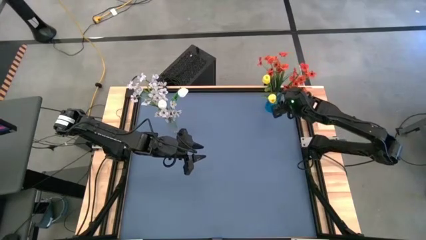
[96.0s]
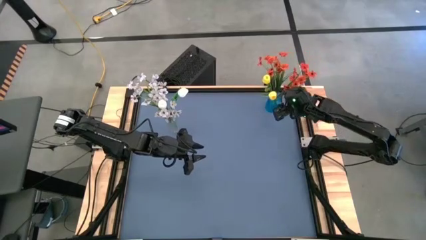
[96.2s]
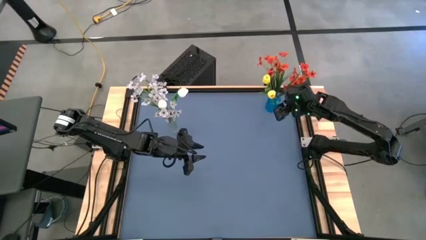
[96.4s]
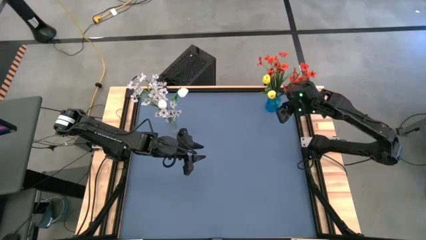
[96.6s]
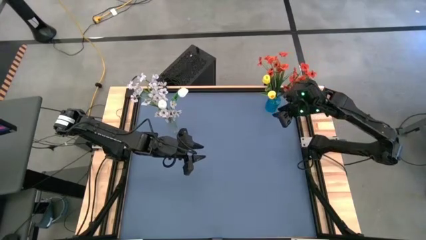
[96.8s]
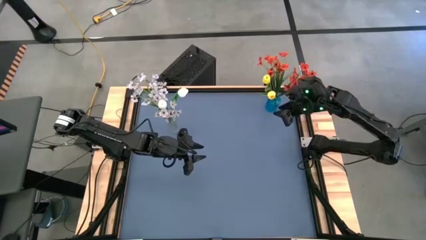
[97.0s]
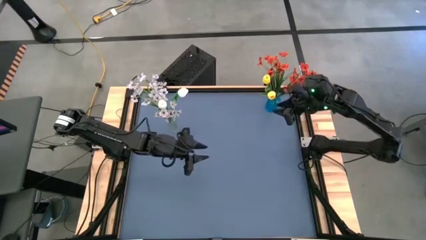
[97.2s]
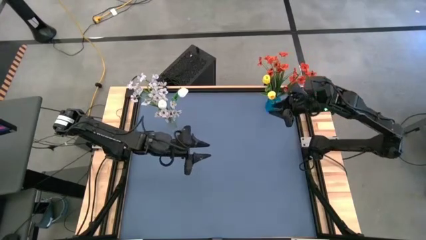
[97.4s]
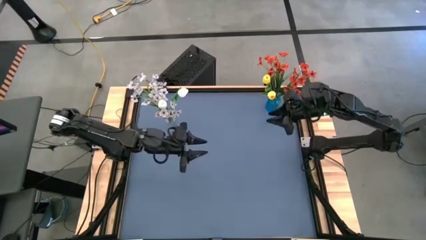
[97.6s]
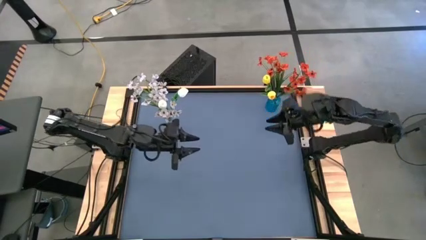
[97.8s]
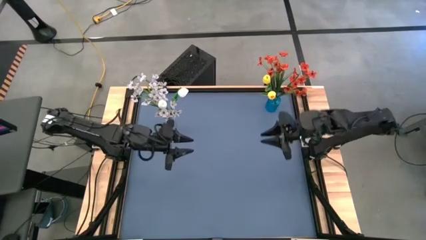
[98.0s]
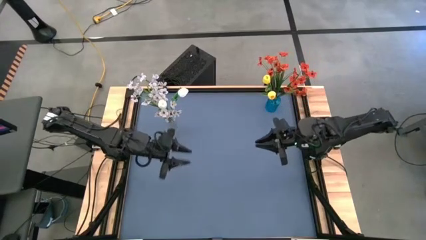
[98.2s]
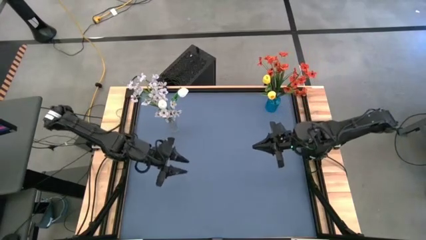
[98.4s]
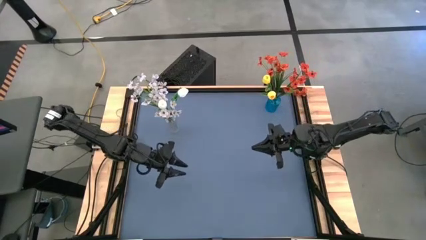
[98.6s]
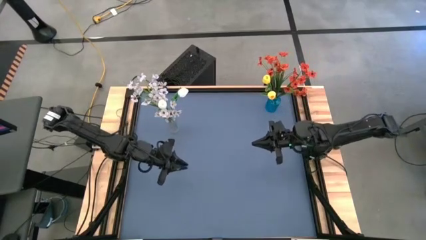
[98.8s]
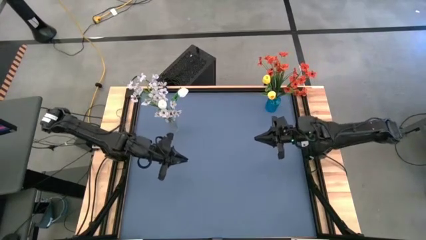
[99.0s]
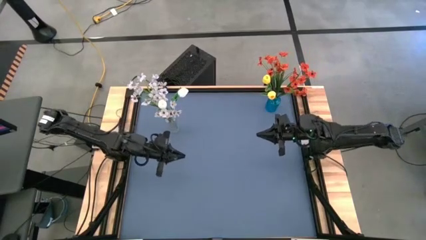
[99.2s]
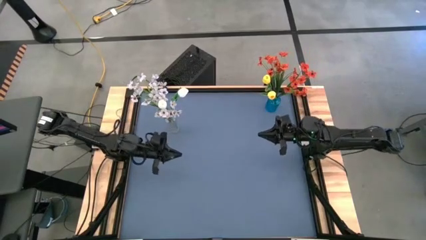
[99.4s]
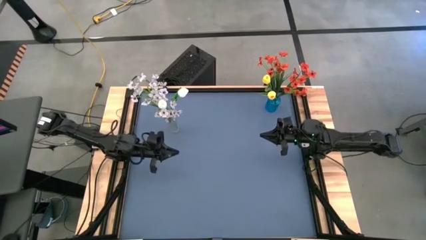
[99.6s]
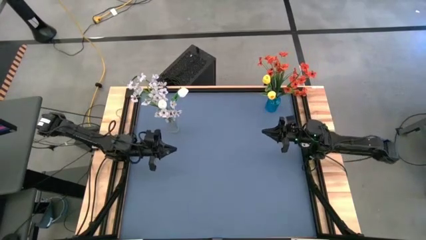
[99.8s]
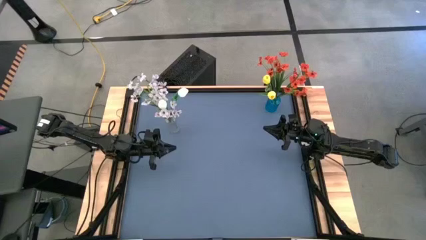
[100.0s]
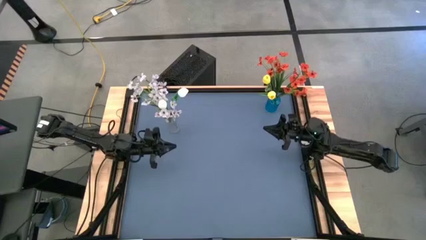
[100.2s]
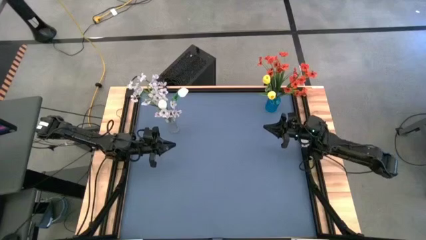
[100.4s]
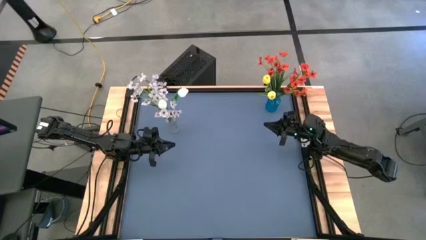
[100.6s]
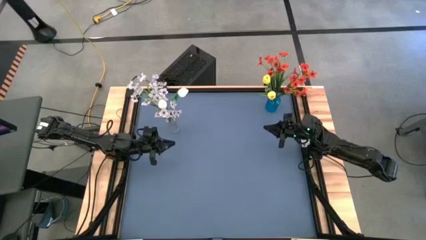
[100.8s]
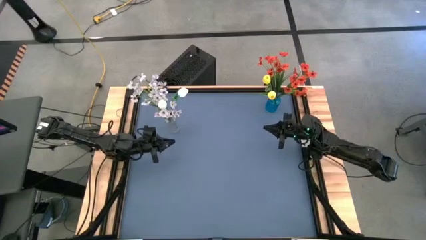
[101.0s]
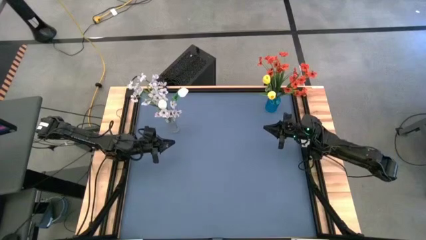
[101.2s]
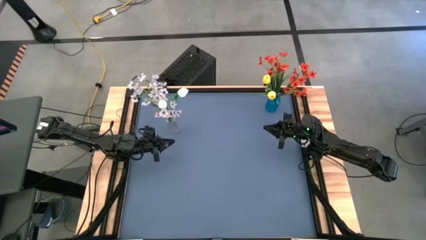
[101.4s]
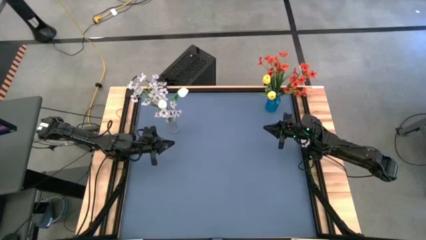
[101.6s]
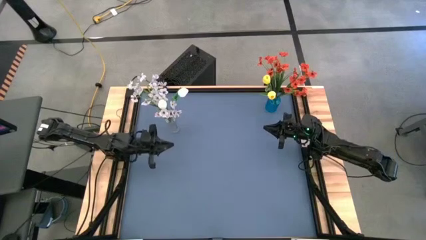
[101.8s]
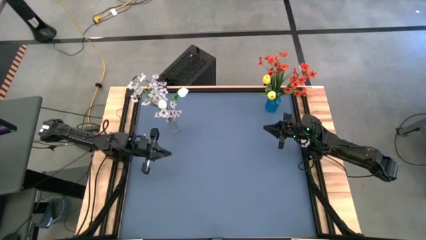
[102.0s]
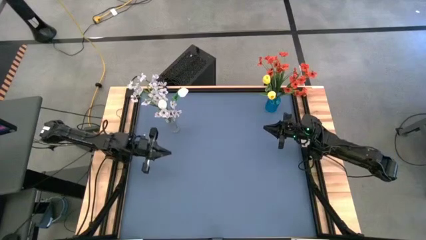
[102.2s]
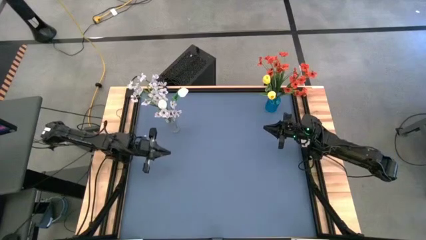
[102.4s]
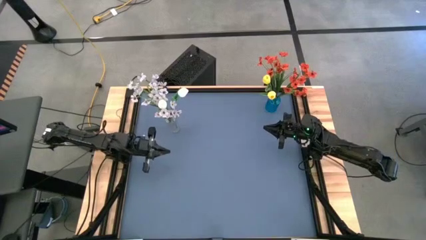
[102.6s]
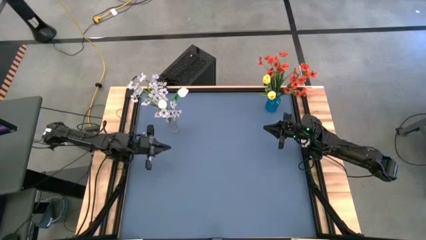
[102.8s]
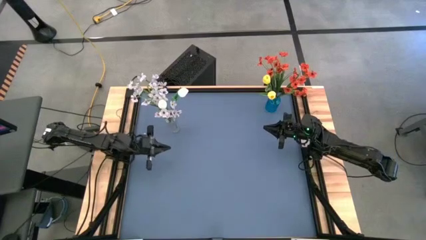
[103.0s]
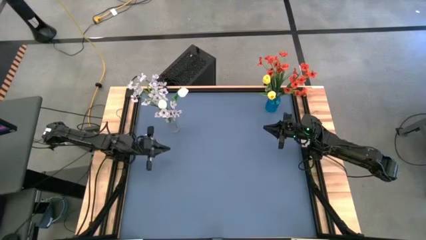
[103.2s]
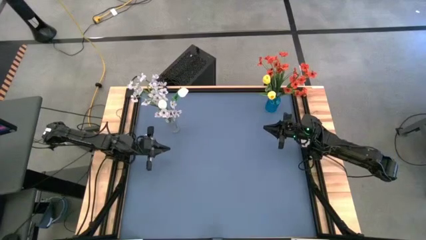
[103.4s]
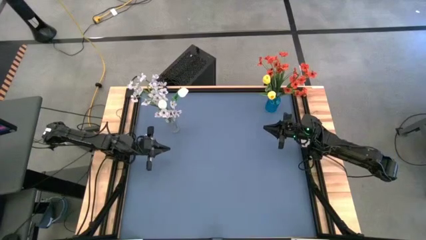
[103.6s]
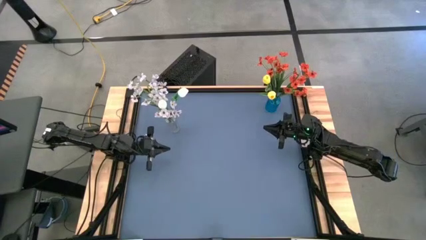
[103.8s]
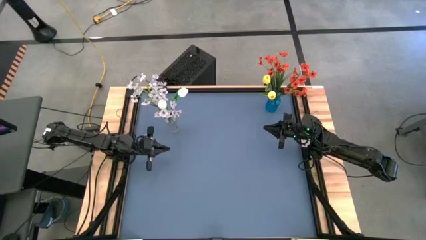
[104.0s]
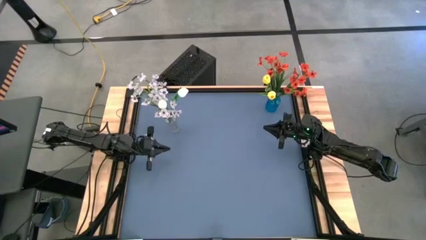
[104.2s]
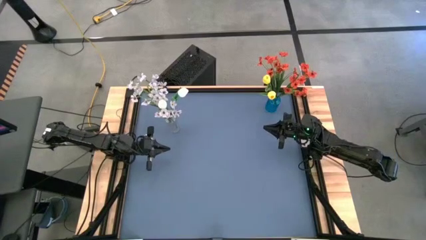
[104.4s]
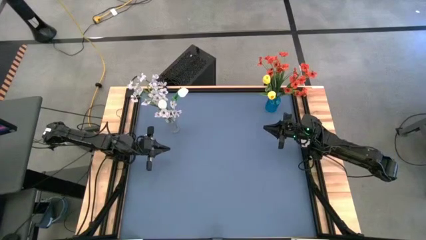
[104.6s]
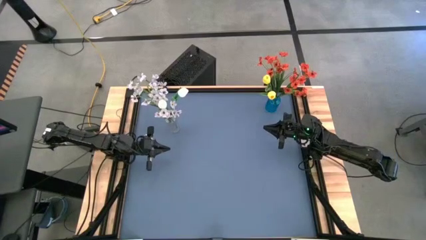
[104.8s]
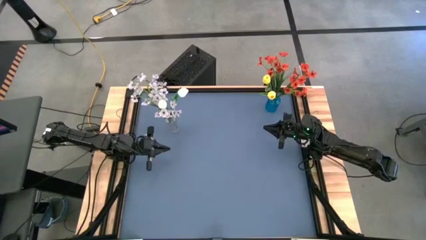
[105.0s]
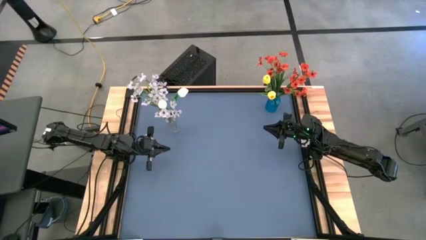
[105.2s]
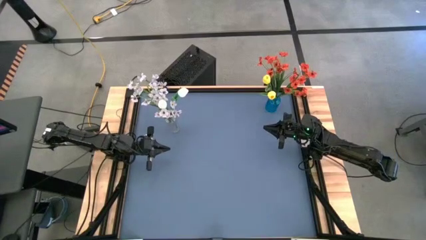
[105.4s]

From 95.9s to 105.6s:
Task: Sort flowers into vase by color
Return to Home Position

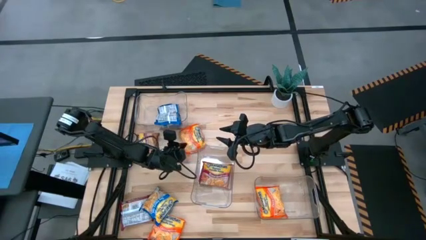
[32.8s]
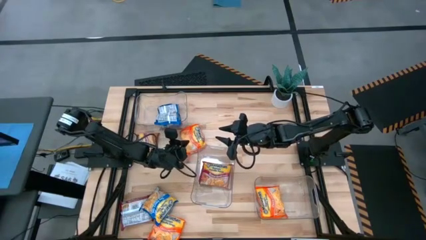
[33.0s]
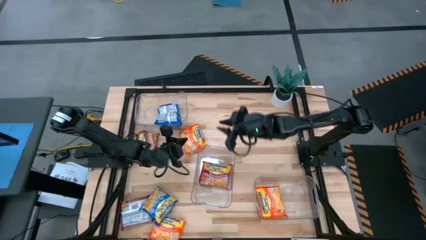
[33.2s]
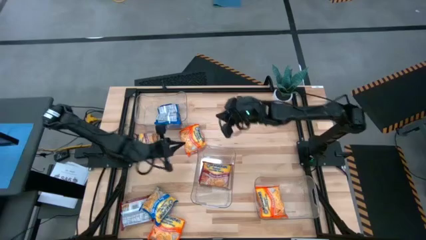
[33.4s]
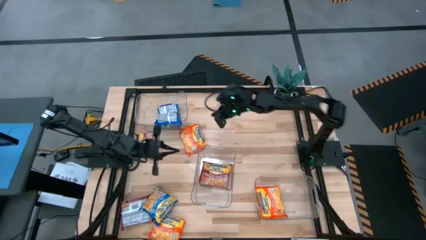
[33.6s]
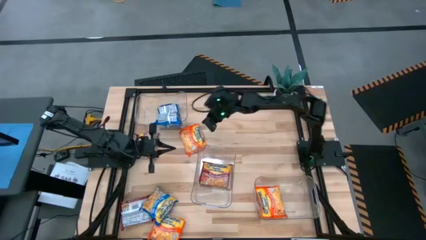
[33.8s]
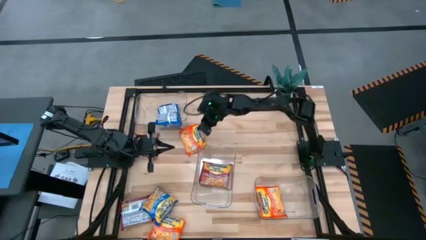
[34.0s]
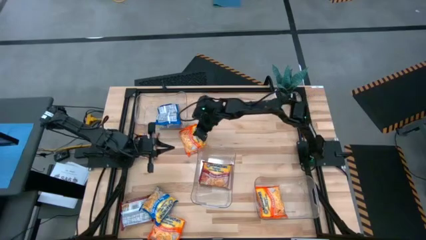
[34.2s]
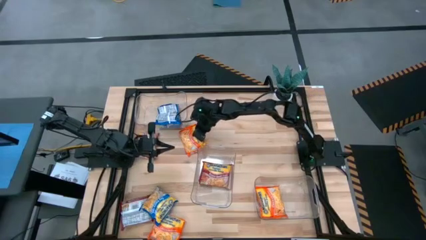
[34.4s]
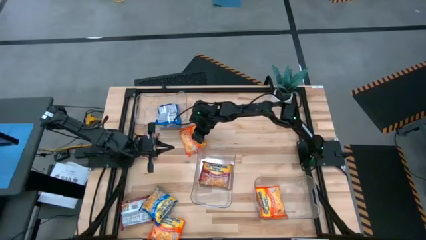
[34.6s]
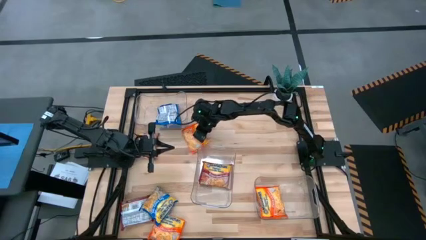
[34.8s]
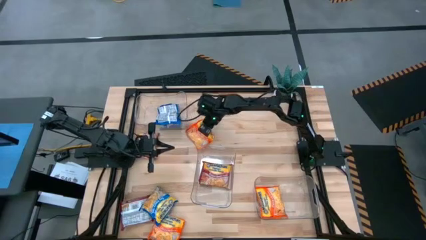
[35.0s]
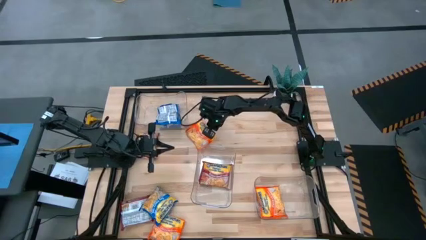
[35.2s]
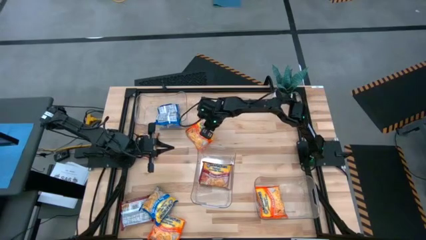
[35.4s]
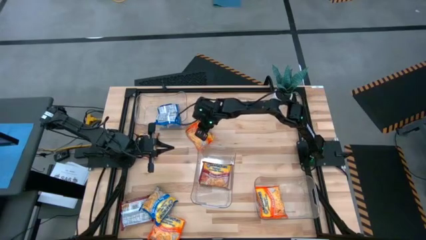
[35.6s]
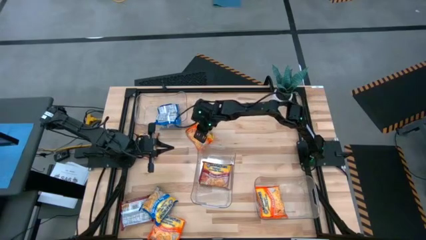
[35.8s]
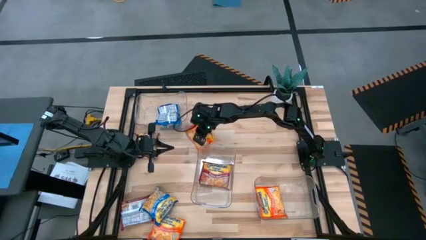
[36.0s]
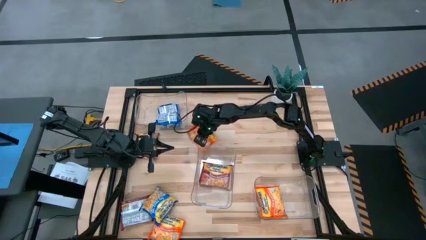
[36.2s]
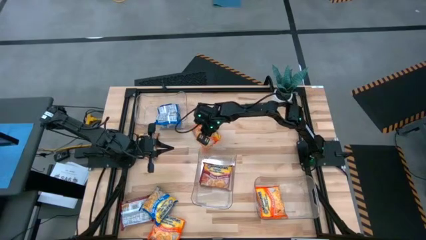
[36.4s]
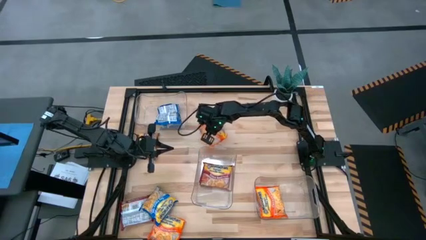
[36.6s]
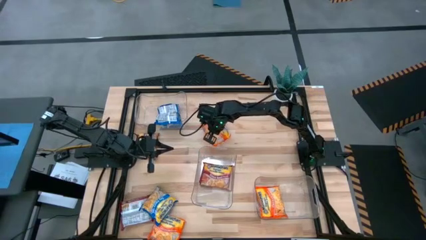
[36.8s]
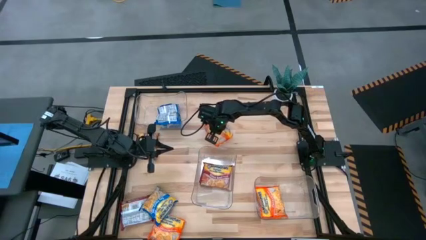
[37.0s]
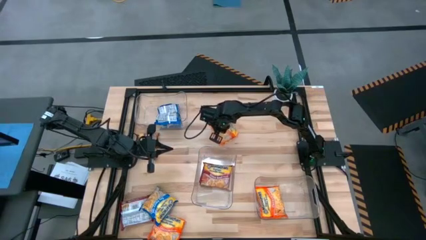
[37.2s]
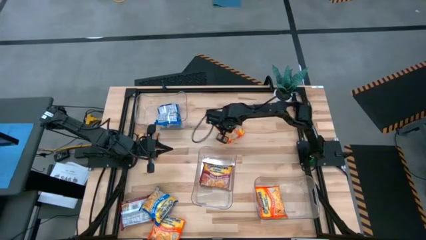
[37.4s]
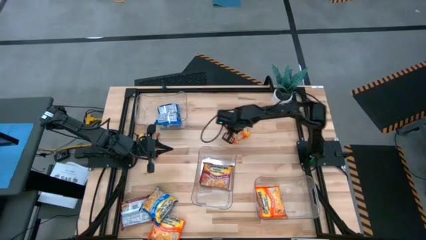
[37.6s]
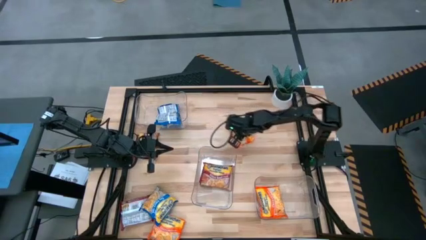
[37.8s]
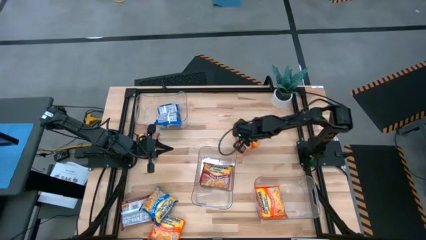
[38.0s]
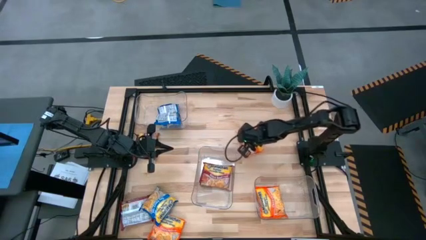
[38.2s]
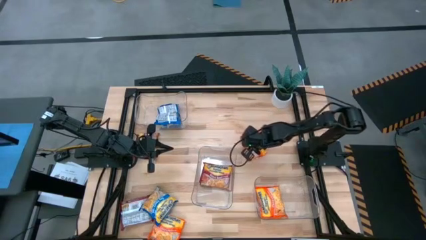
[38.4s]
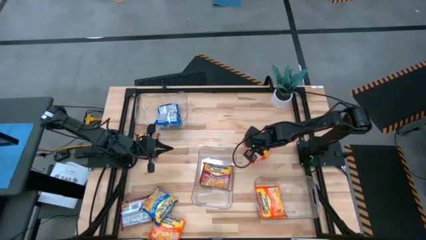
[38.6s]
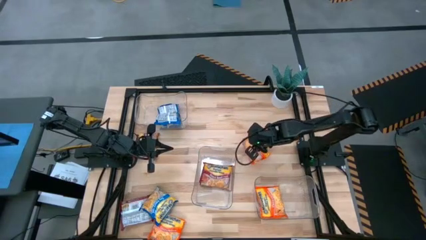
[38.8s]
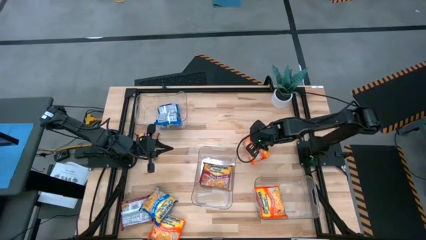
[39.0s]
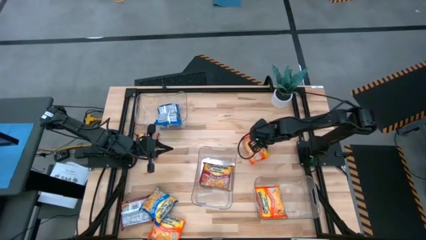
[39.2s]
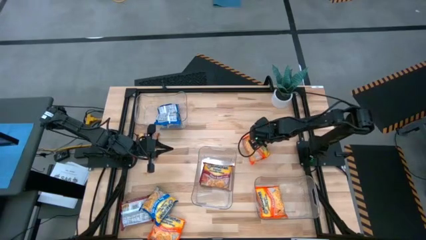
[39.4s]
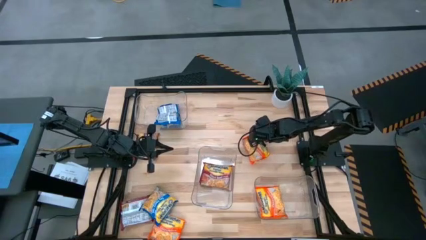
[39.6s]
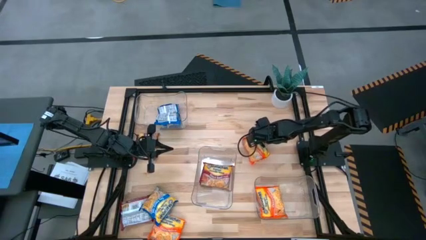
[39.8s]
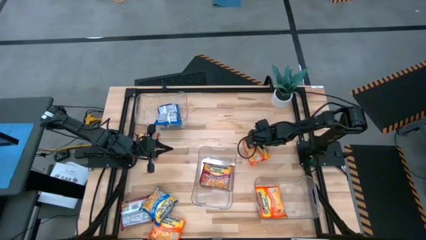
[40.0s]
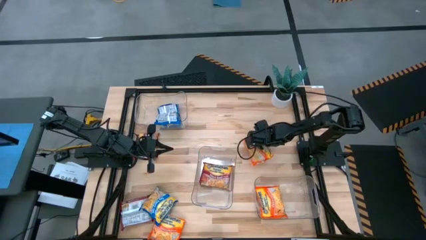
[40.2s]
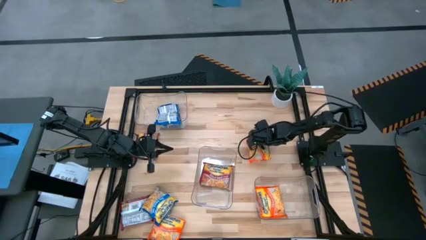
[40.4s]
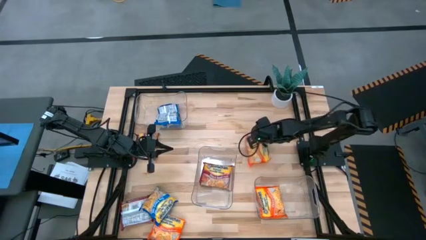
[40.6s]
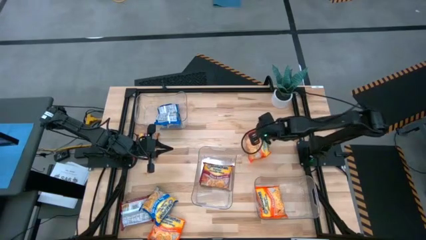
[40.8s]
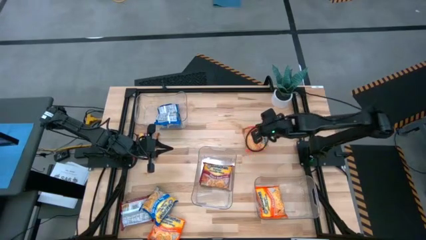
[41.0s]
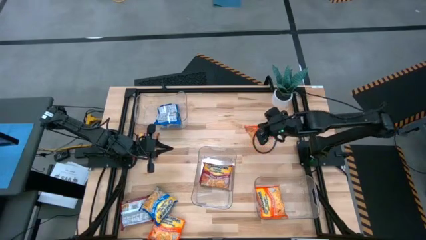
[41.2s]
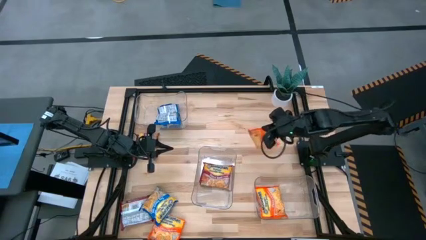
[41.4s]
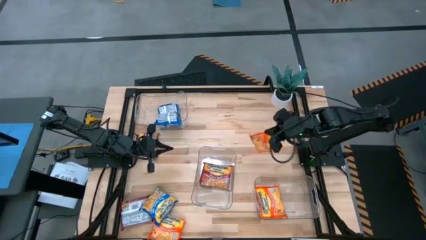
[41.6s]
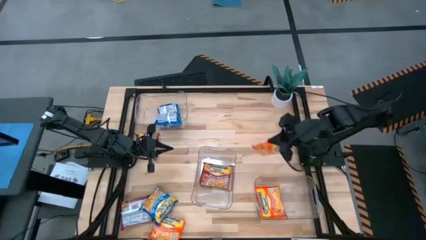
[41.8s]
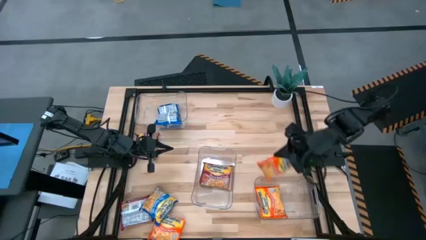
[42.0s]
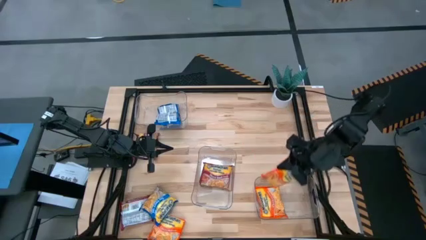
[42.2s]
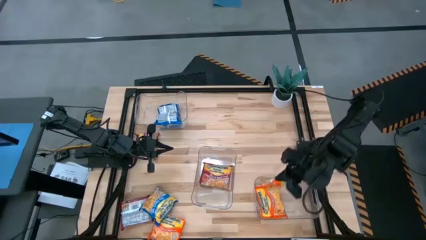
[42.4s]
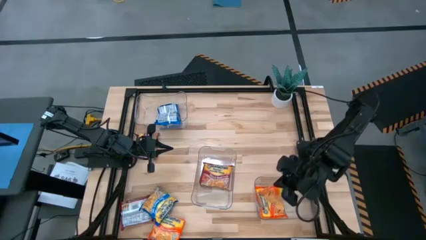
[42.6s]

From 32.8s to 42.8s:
Task: Sort Maruchan noodles
Put the top orange noodle pack into the bottom transparent bin
